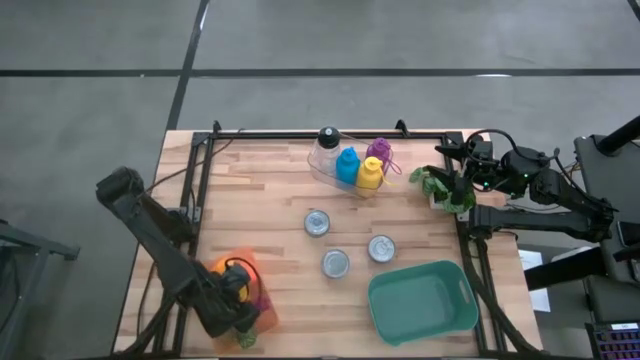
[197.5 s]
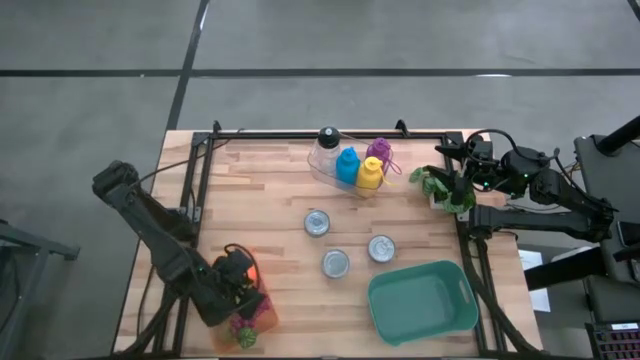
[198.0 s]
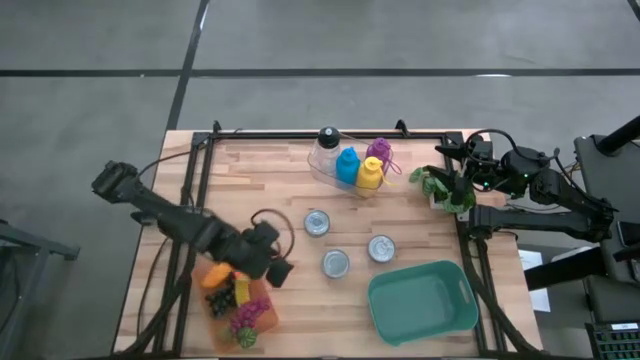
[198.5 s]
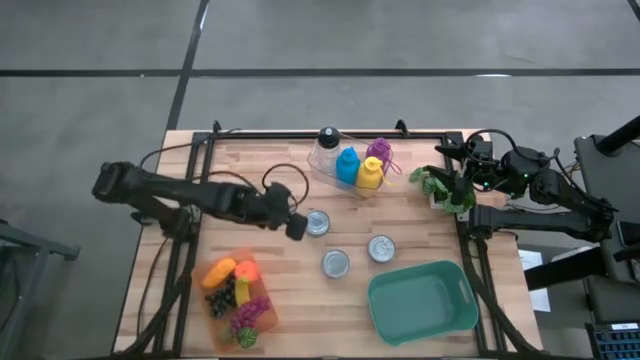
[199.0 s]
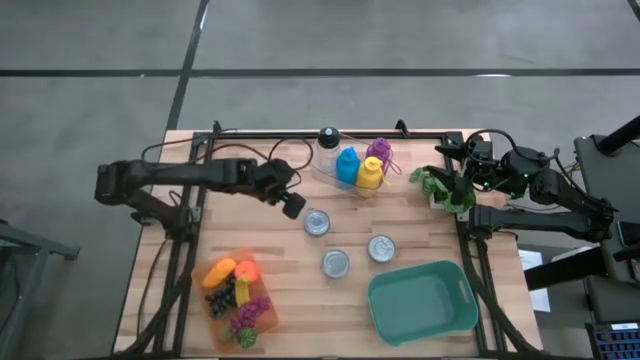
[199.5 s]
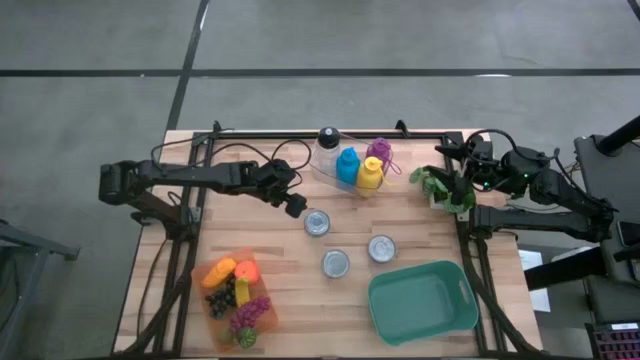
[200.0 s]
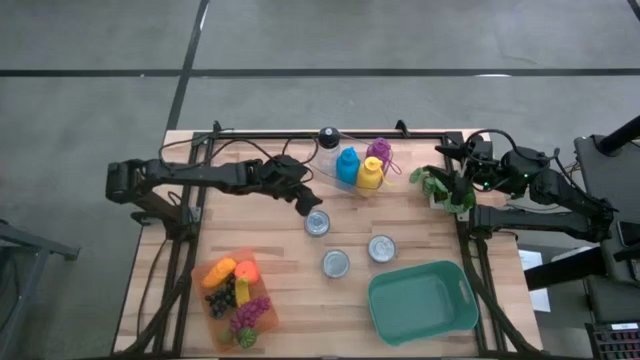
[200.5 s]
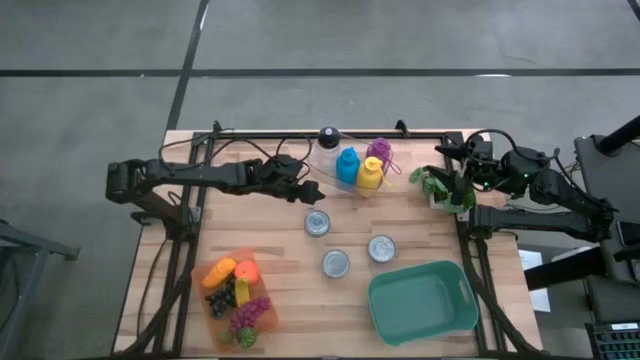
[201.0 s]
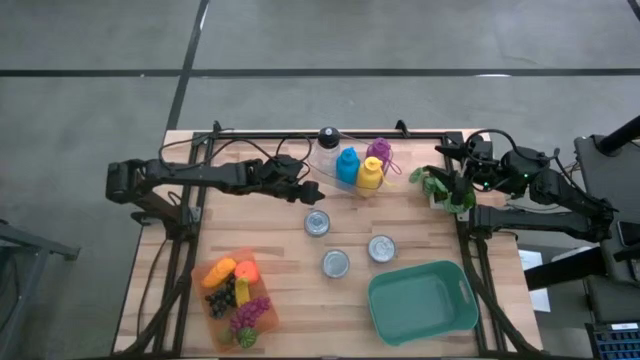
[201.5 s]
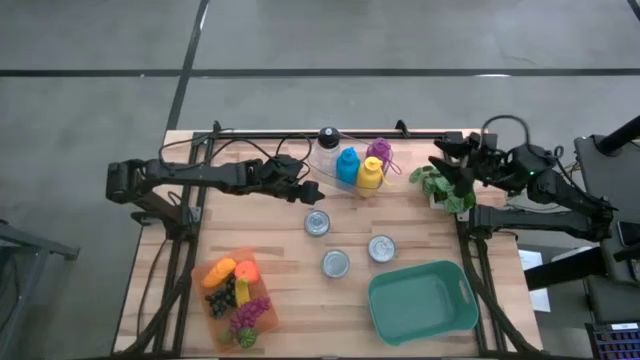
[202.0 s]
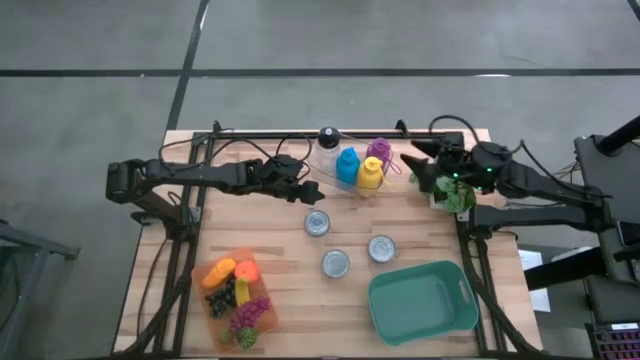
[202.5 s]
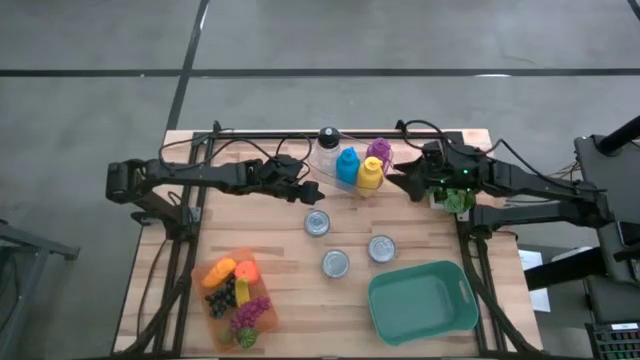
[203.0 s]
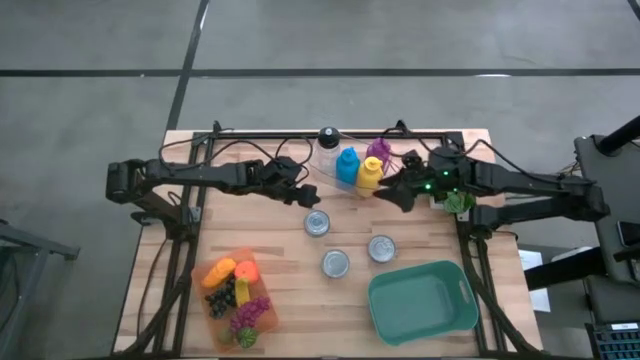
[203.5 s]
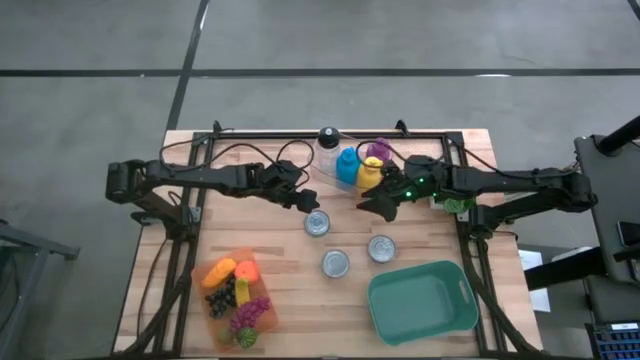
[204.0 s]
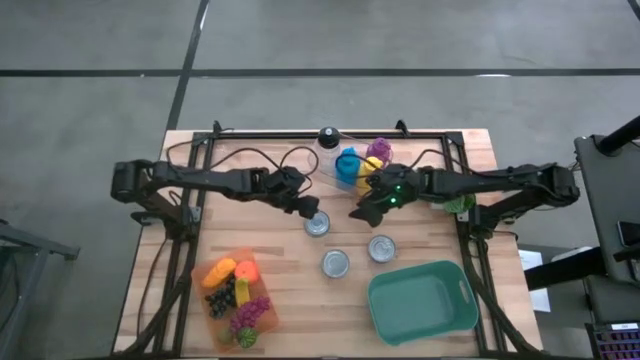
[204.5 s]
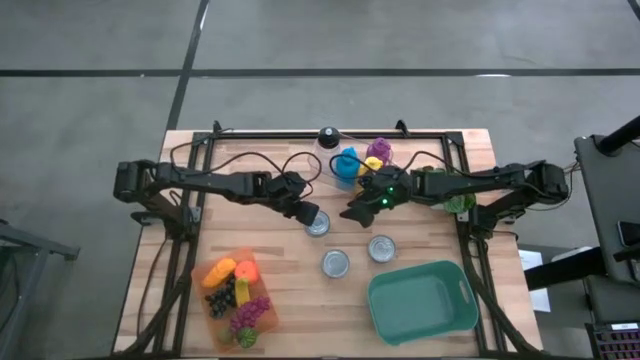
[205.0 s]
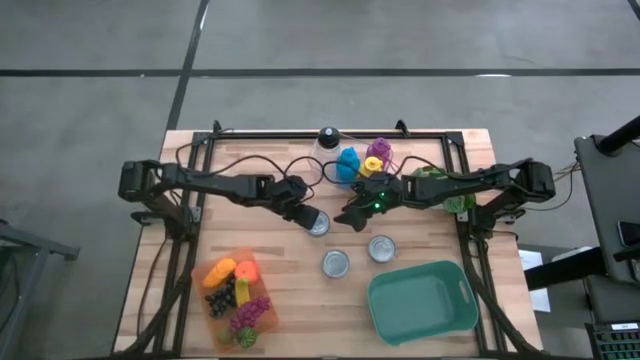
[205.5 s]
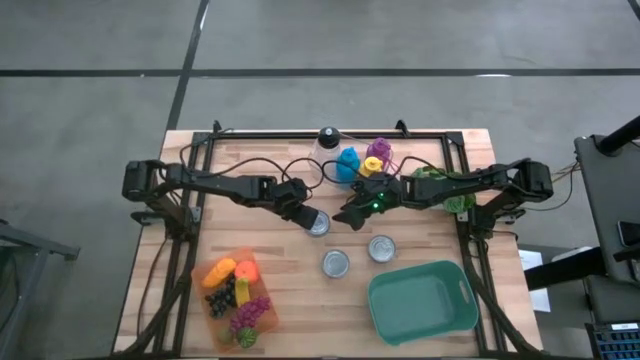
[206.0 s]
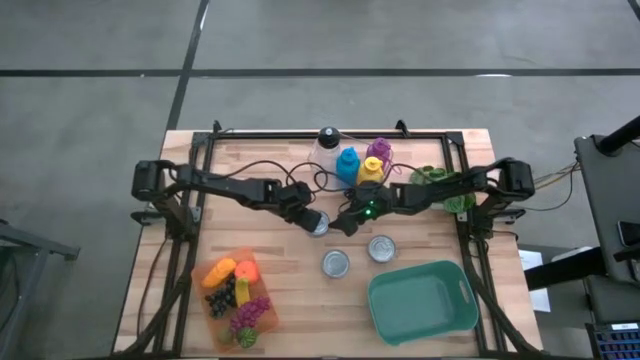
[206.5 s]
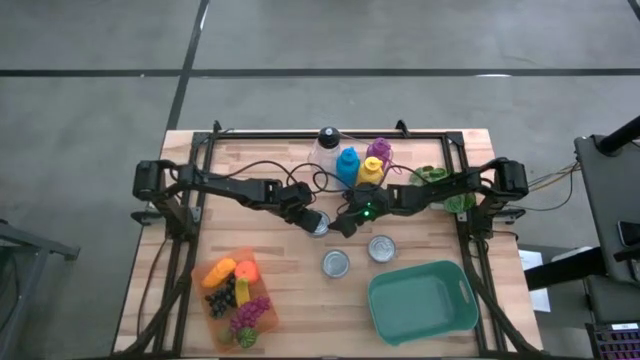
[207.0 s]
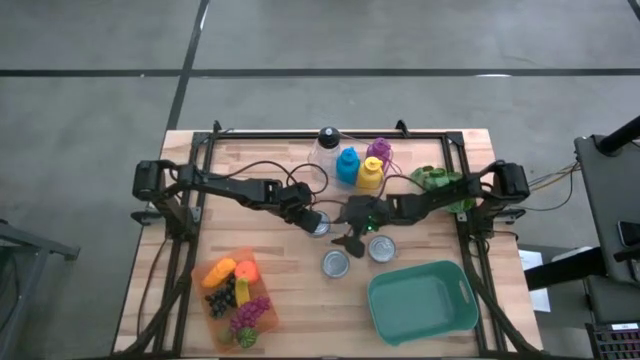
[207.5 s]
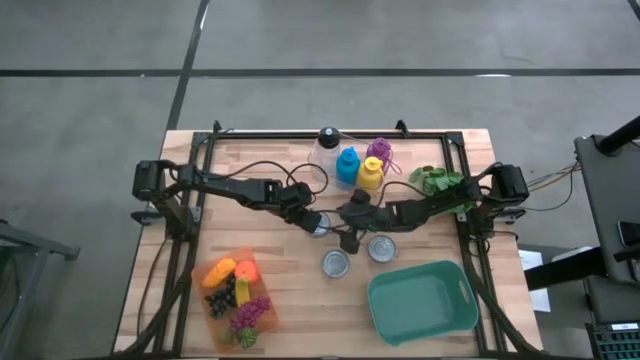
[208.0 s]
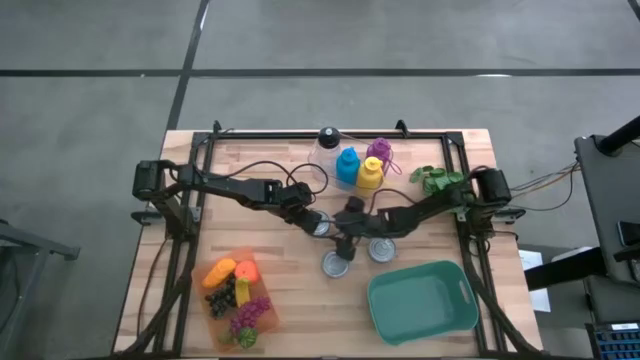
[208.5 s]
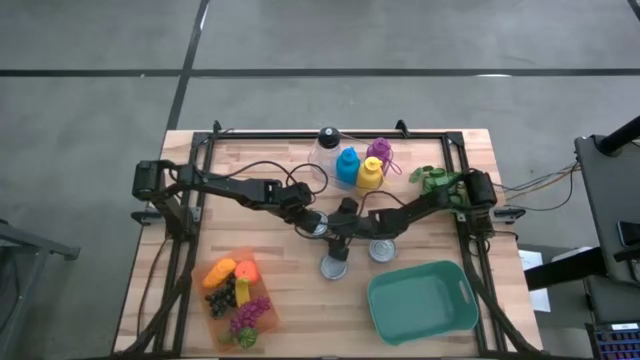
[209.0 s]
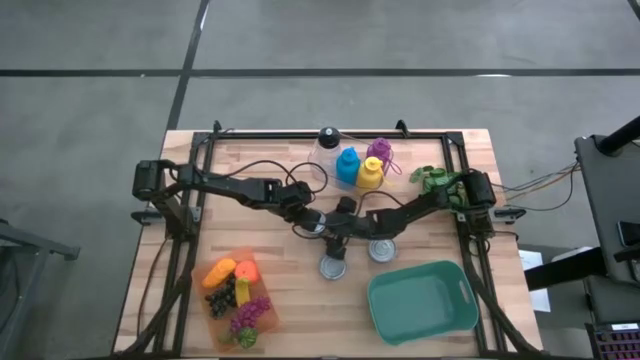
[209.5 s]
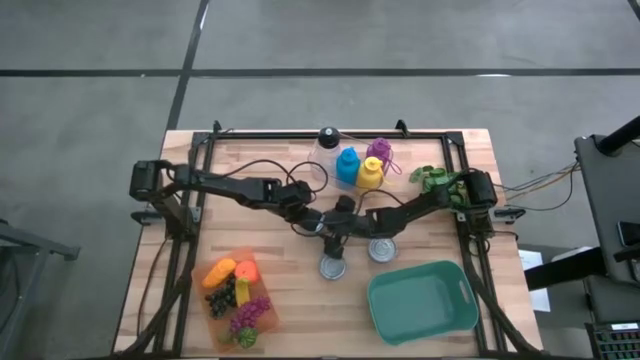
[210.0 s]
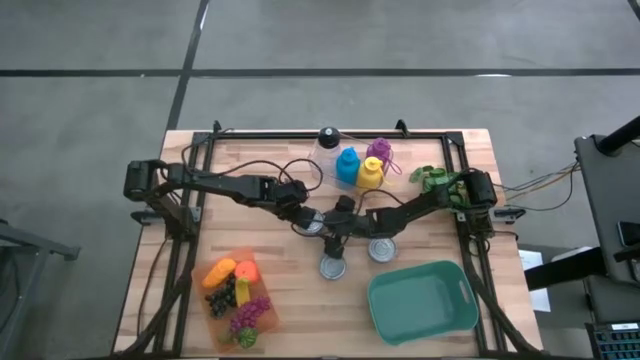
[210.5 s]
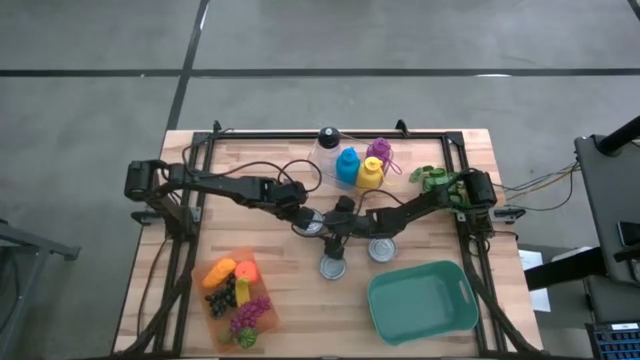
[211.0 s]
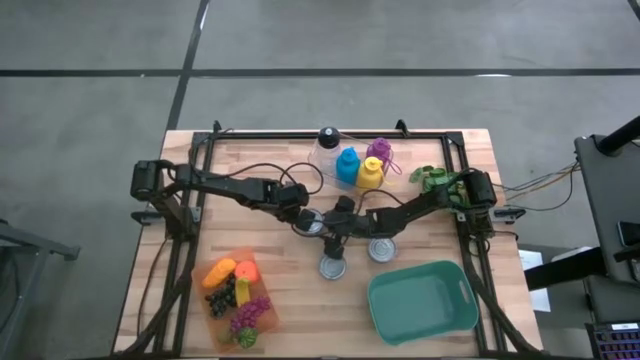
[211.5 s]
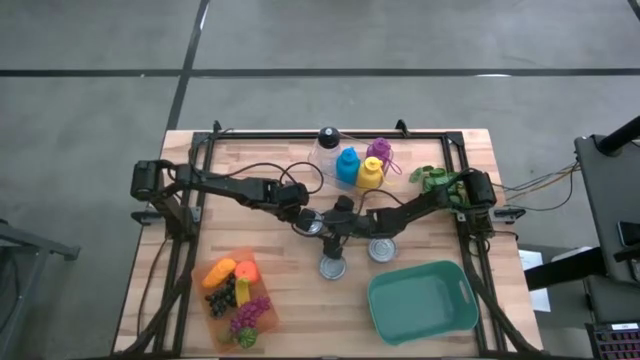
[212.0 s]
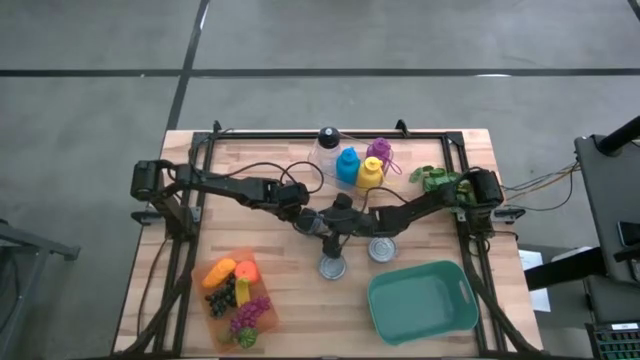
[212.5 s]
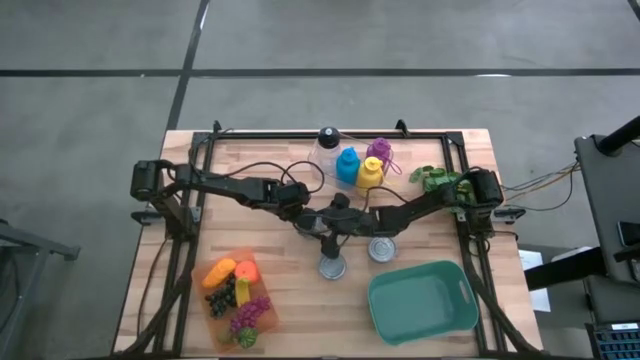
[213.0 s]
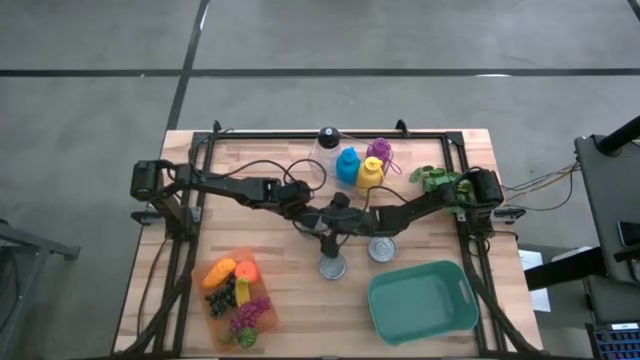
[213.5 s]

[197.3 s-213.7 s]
Task: Pick & Place Food Item
Put the top green tuna can into the green bin

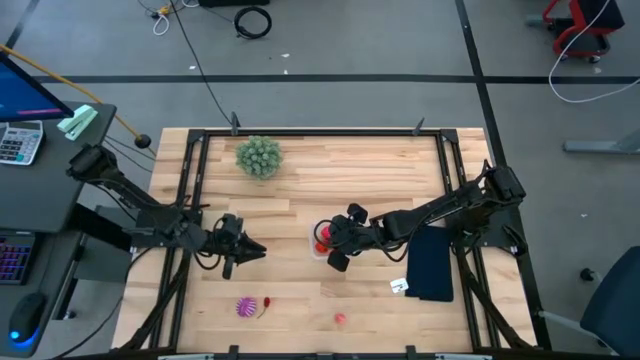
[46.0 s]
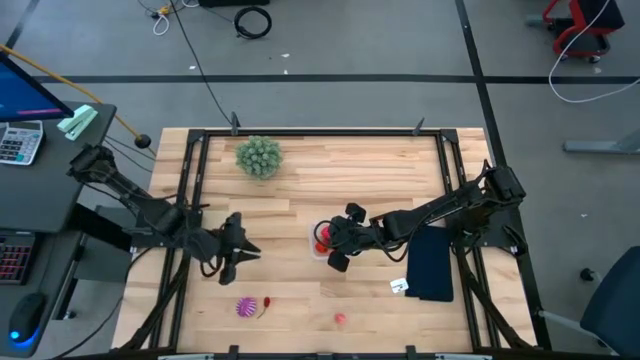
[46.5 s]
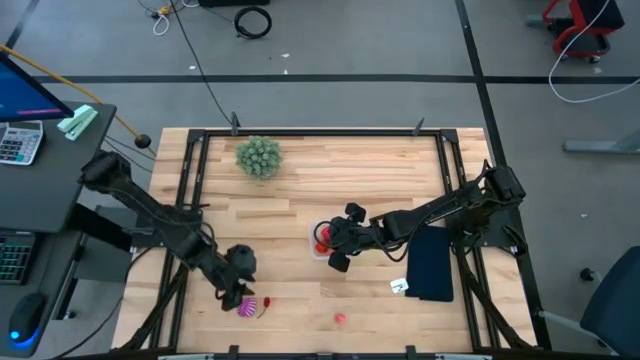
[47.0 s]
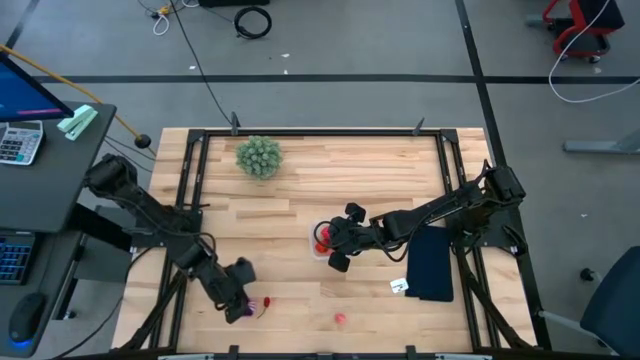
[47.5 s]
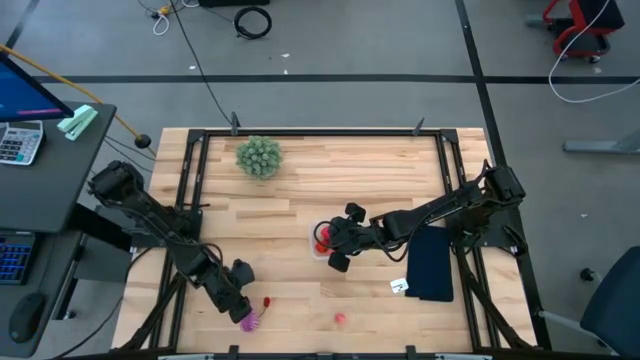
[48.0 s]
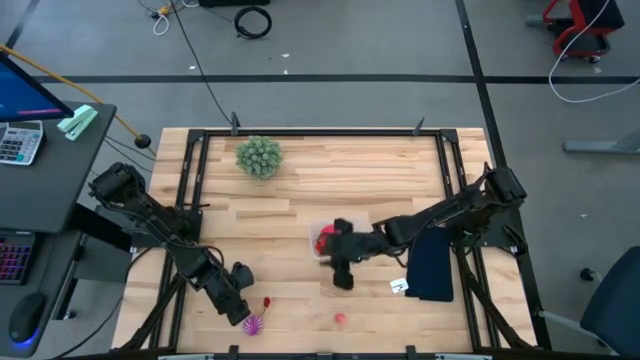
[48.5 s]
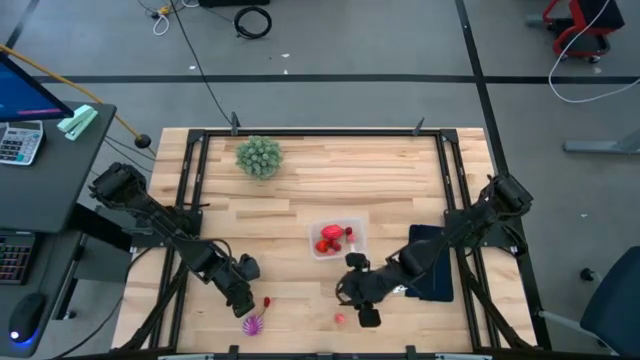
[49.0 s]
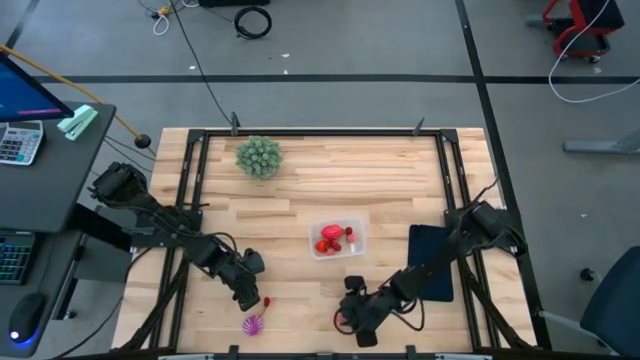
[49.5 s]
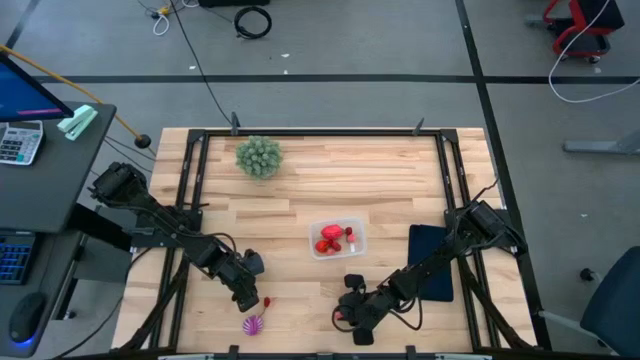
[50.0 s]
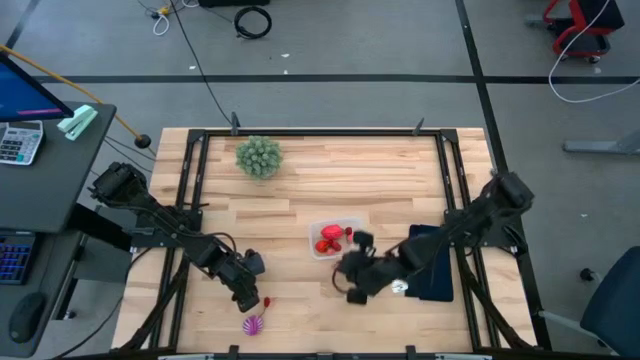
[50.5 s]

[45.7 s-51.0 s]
Task: Pick and placing Produce into tupperware
Put the purple onion into the transparent bin

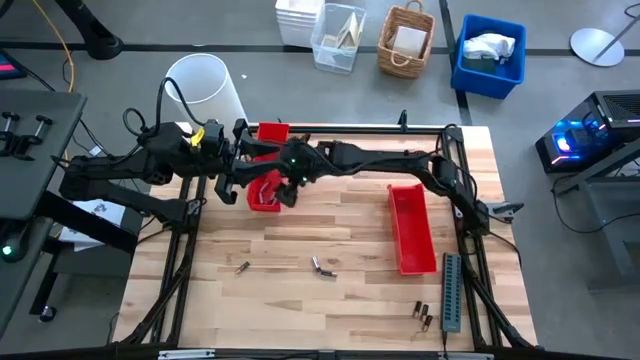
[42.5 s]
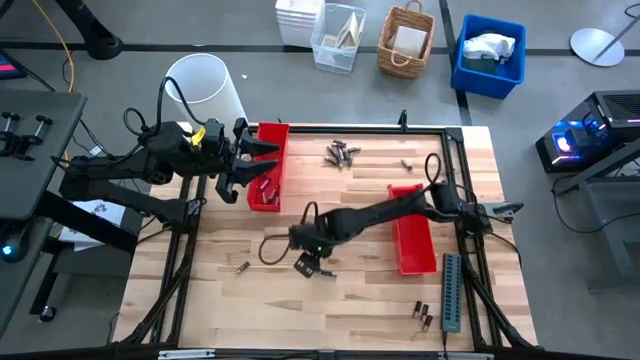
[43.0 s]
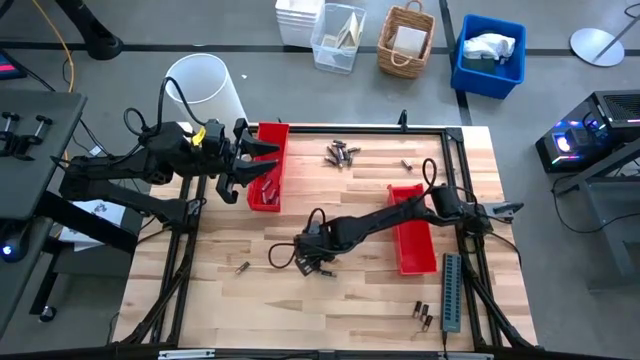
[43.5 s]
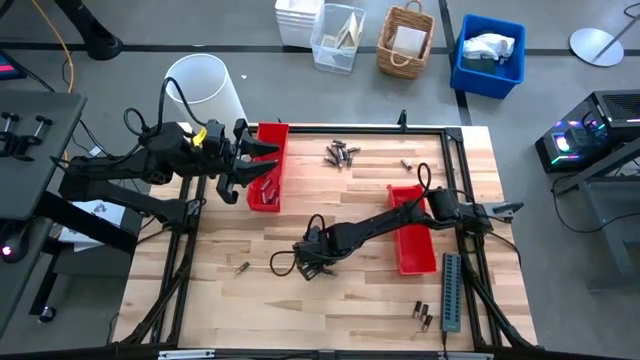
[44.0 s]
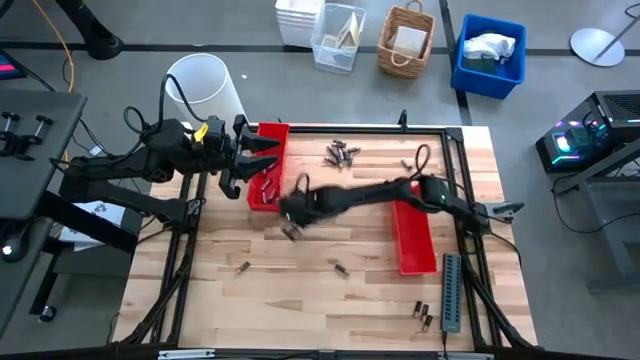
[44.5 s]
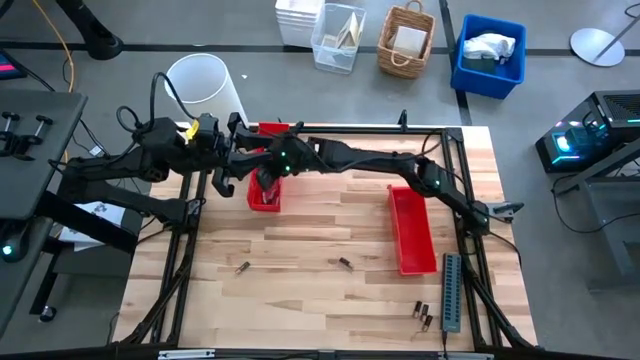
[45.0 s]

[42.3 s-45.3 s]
Task: Sort batteries
Put the silver battery into the top red bin
